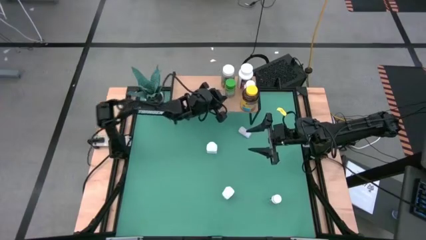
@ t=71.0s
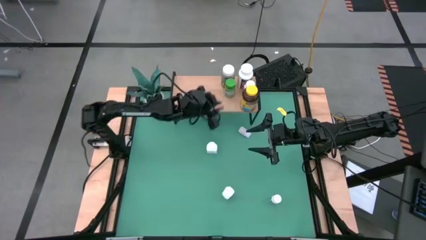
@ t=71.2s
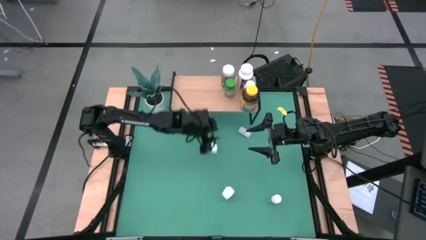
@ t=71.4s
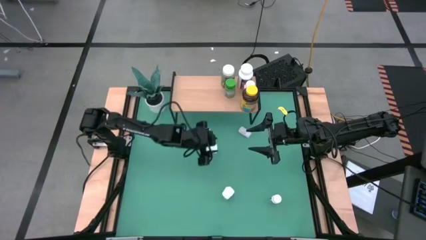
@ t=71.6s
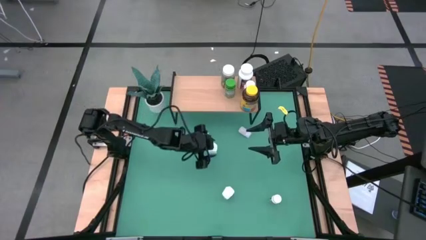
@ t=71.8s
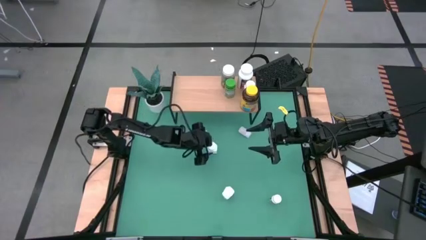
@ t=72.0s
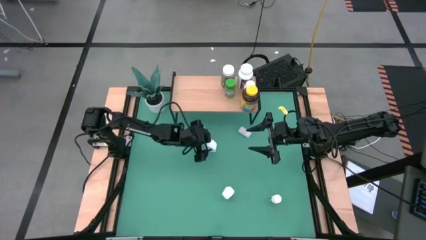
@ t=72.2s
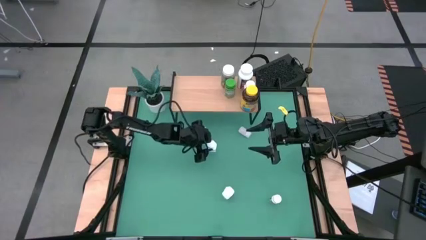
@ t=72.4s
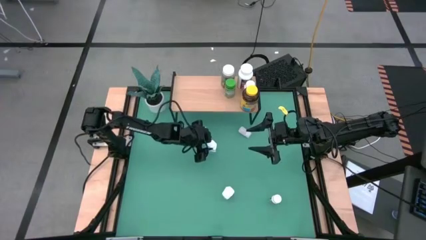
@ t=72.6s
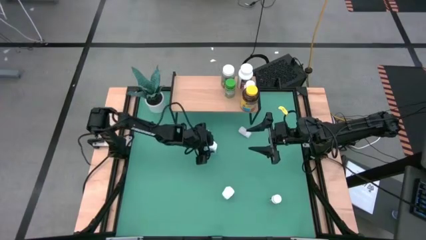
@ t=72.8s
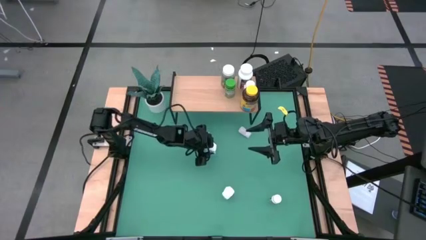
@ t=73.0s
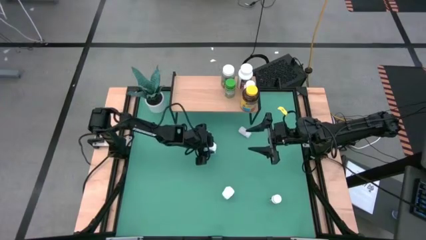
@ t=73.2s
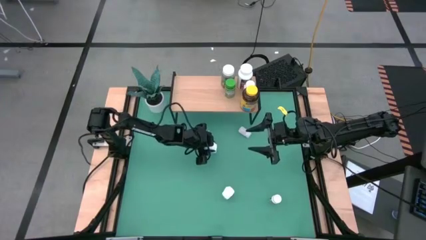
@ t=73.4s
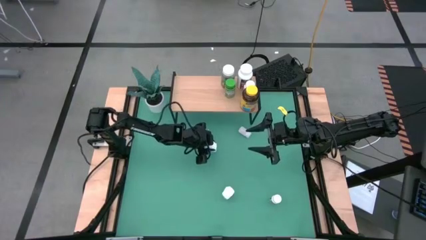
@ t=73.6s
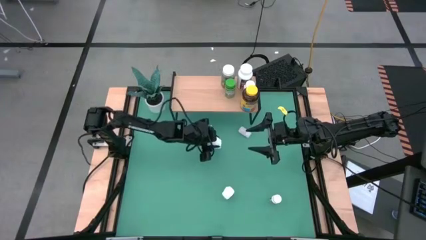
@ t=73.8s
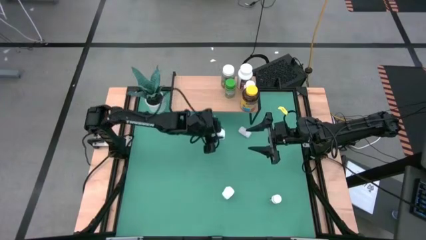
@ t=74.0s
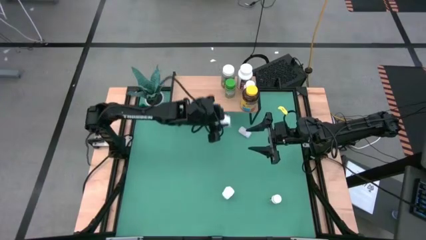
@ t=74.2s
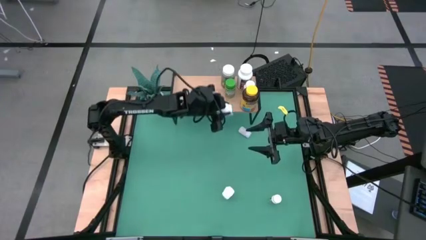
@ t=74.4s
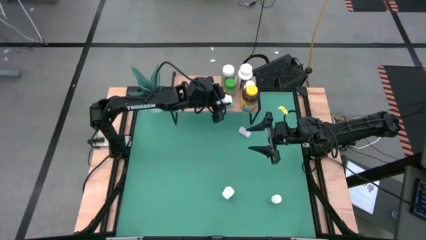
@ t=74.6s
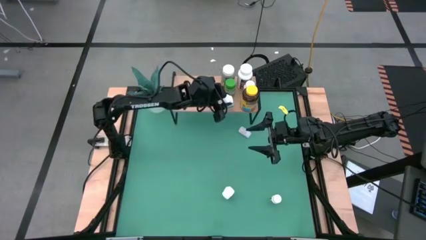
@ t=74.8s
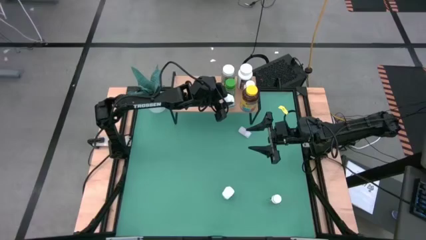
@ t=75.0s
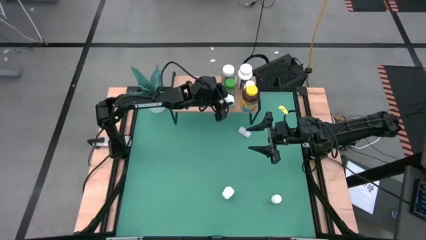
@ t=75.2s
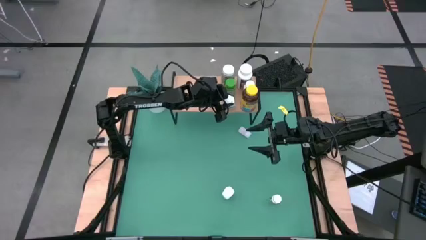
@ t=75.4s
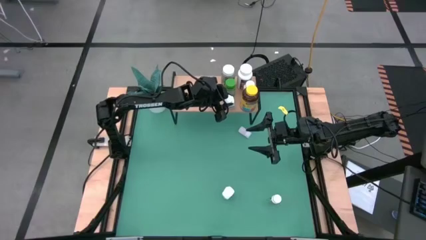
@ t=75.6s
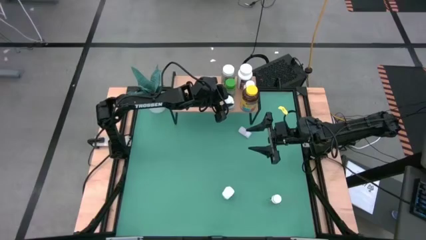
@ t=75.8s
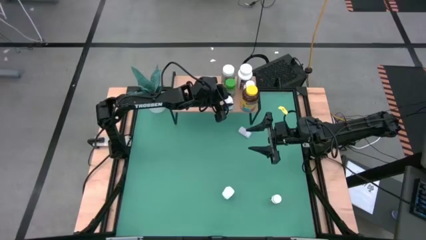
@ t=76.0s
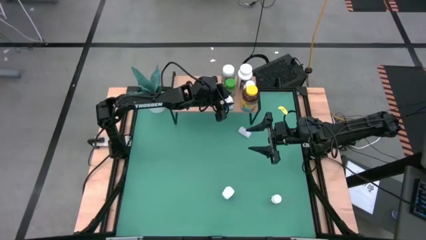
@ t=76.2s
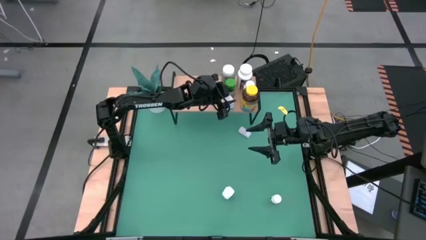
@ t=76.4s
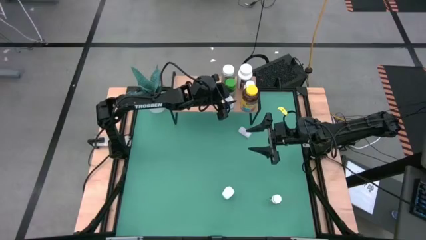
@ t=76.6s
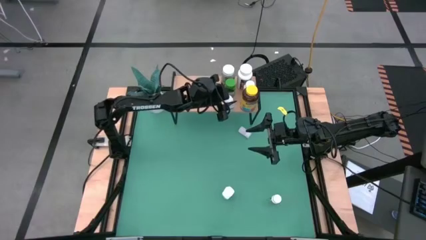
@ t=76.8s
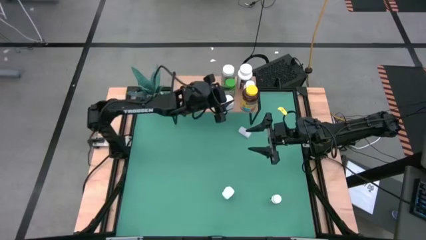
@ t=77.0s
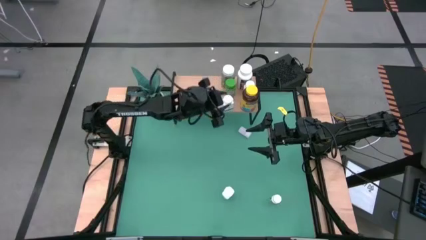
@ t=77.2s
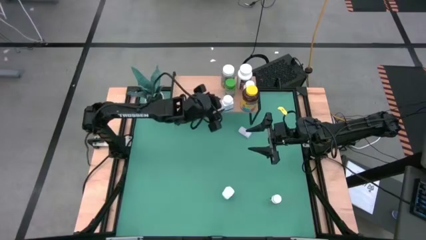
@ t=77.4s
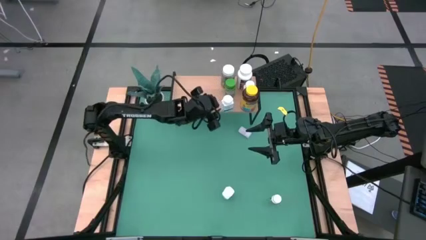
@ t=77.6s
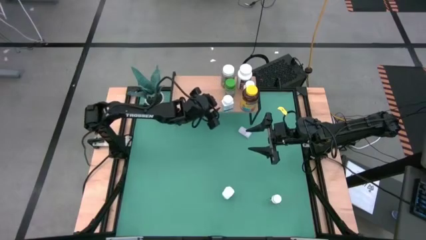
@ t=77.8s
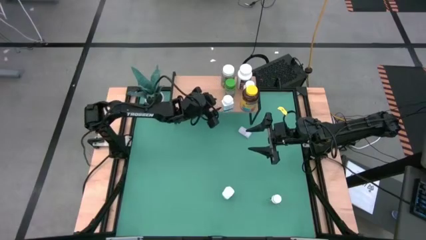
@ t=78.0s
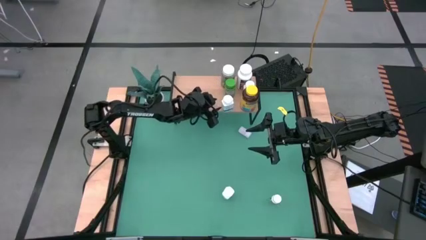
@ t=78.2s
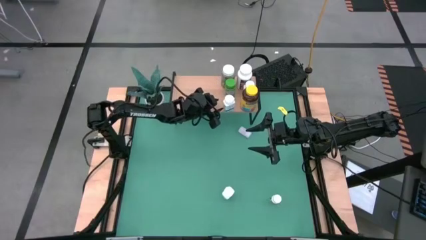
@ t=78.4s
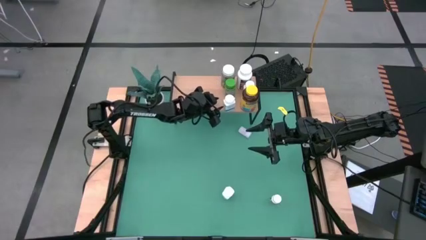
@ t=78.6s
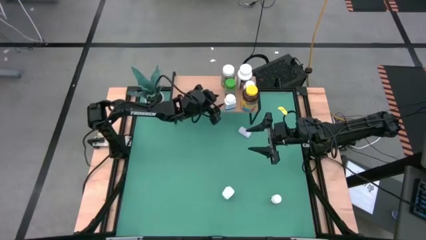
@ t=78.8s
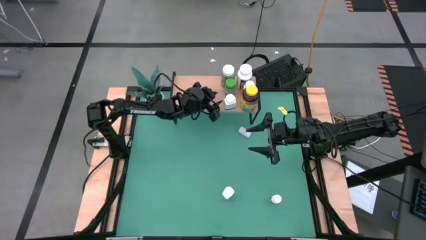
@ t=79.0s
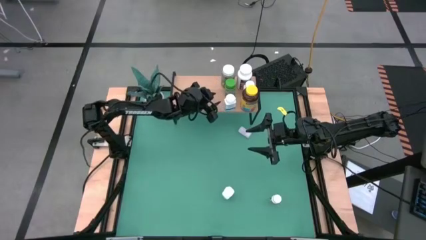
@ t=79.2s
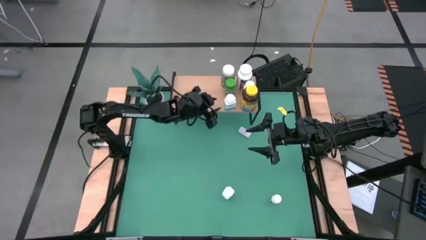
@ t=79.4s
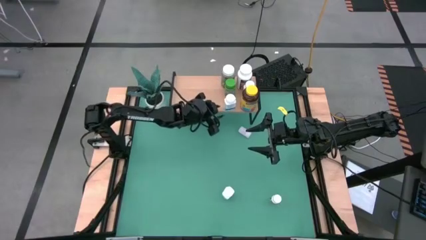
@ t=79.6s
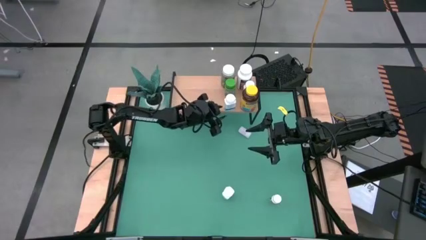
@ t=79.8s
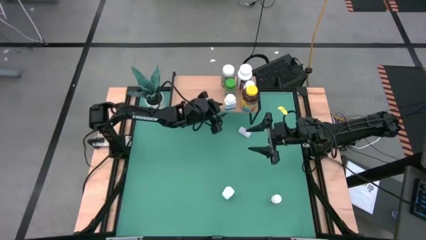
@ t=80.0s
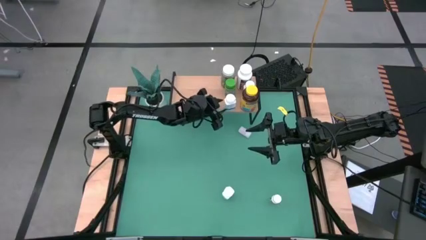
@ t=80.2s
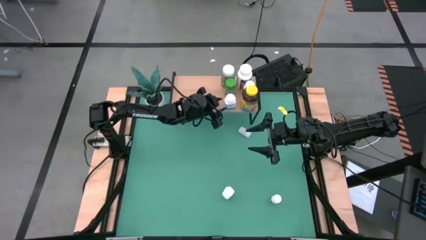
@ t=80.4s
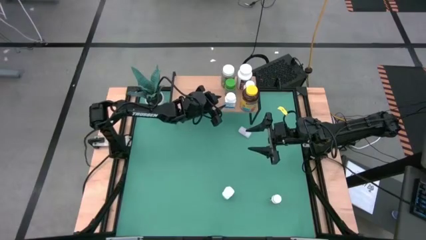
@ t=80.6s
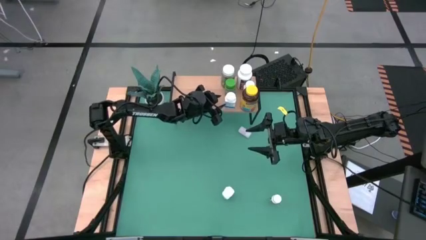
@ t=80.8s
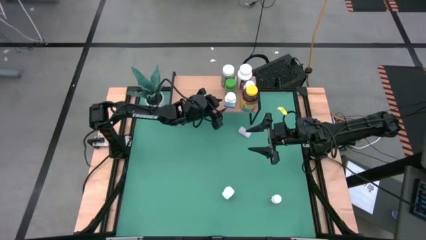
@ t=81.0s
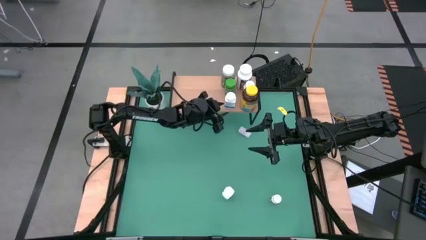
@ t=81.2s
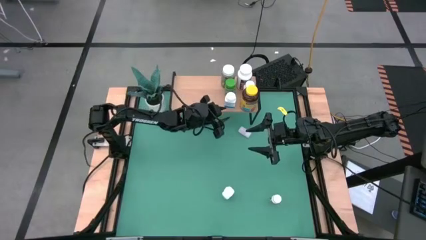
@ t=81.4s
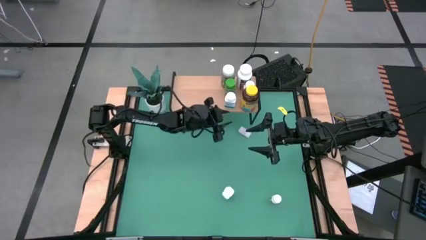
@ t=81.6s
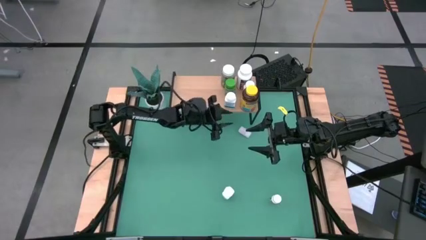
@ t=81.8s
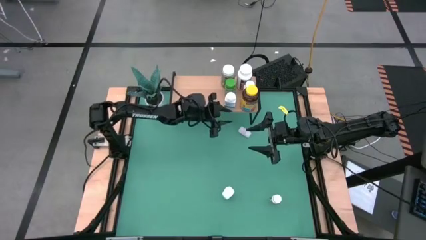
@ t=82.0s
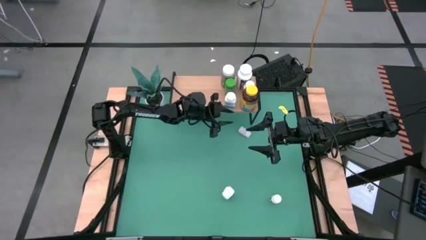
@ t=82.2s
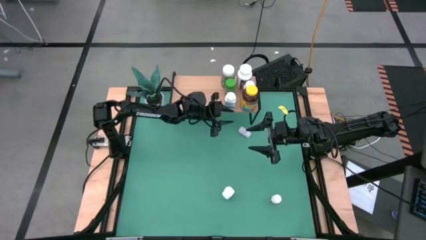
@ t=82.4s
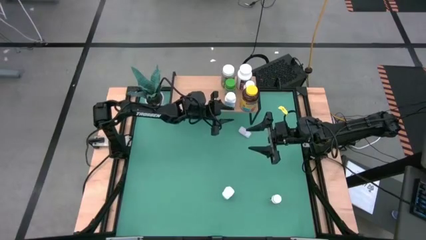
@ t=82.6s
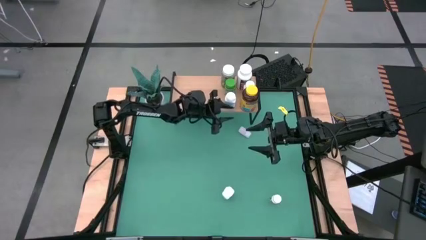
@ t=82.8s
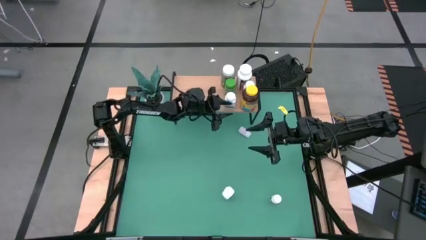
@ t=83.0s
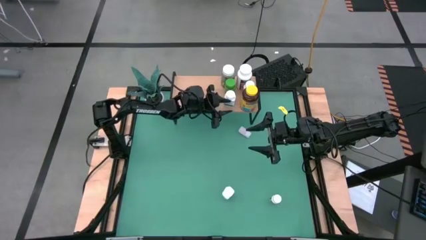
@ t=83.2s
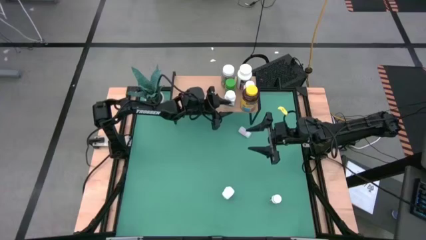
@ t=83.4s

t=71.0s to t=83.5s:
Task: Pick and place medicine bottles onto shelf by color
Put the white blue medicine bottle on the top of the shelf

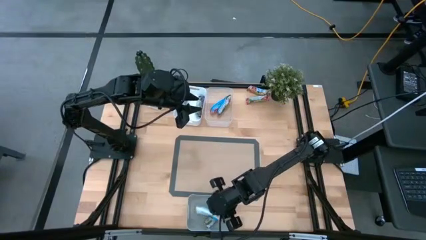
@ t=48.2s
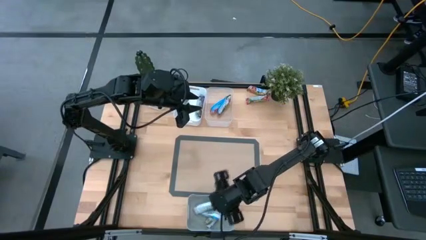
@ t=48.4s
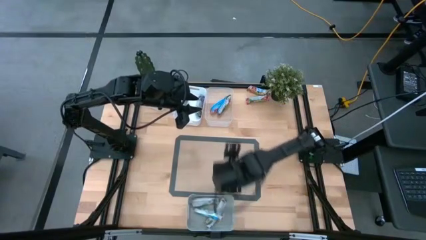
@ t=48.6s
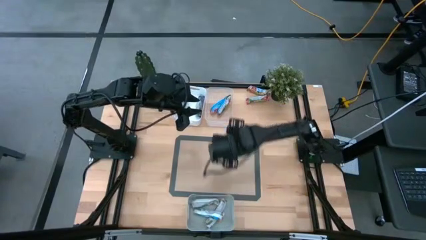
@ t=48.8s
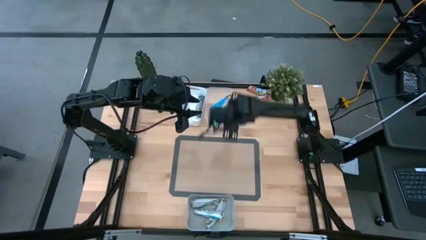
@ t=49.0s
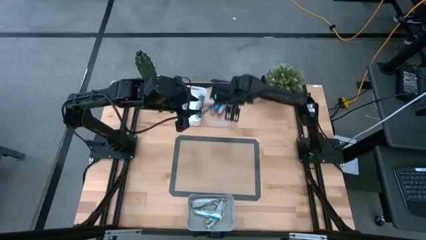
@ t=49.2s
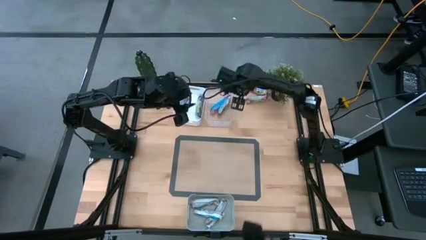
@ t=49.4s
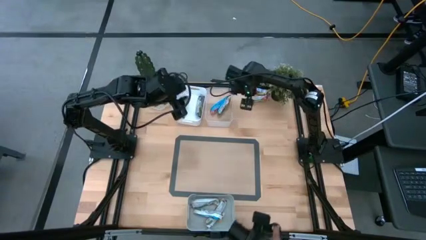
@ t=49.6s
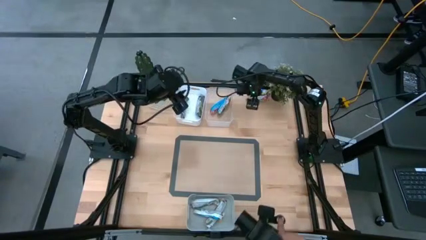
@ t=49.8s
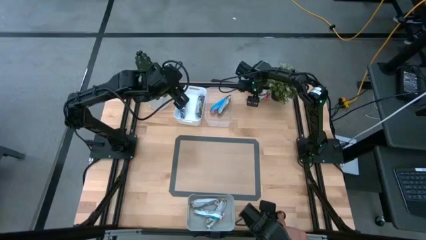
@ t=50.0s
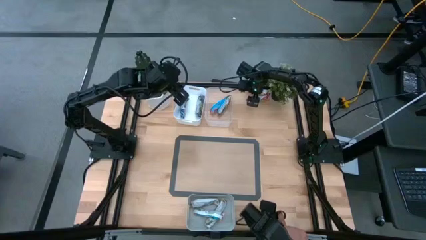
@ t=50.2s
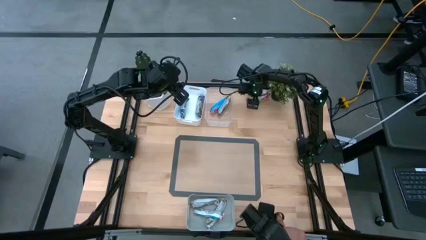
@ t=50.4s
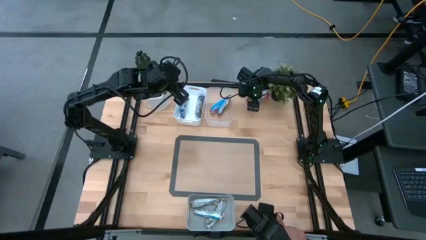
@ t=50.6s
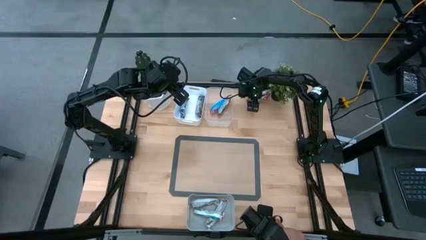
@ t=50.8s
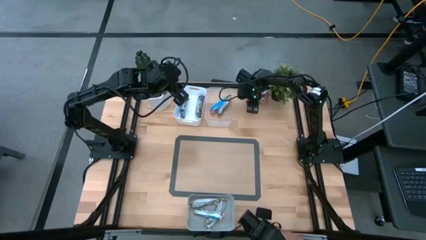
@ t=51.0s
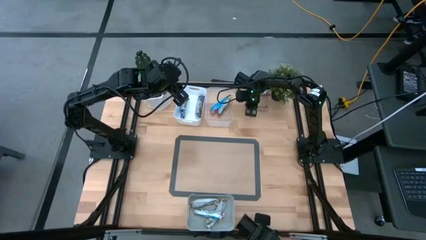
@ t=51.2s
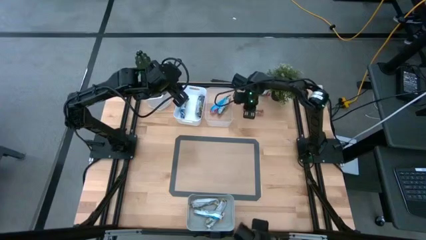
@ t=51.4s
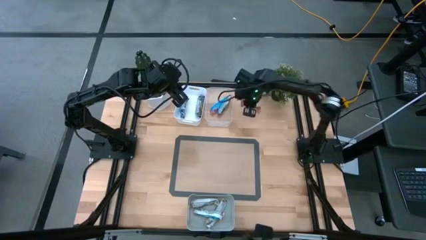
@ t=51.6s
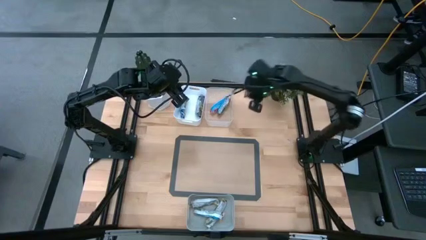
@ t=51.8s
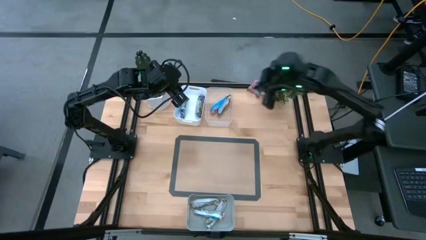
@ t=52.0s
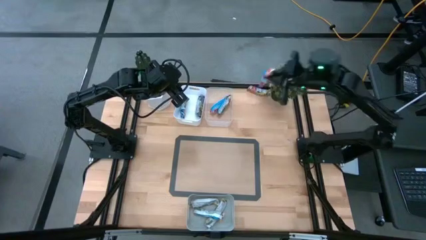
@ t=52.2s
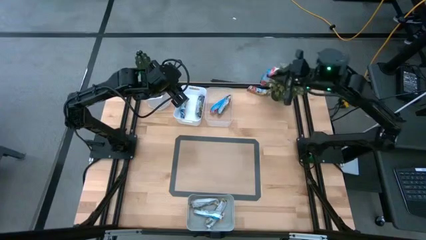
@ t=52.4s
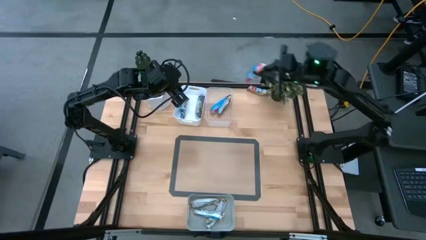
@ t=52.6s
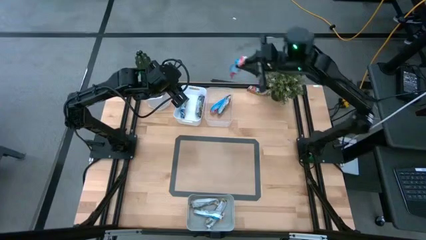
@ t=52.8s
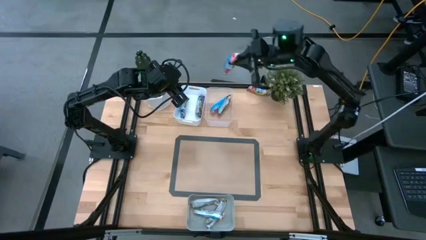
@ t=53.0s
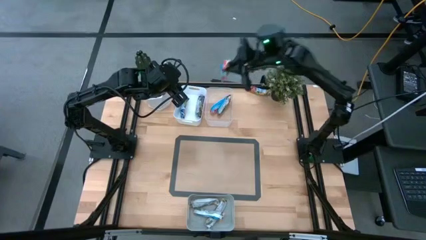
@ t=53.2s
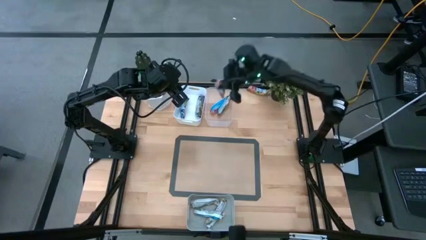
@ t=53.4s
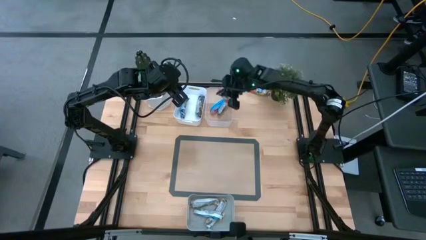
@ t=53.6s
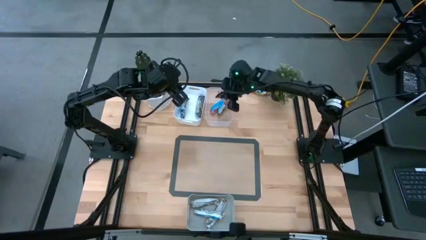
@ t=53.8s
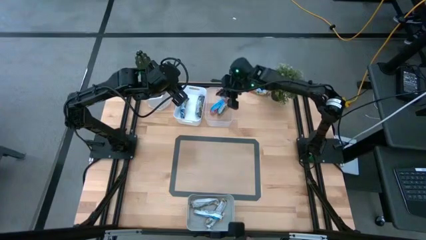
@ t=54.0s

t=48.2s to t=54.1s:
Task: Pick and place Granola Bars by type
Put the red granola bar into the transparent bin
